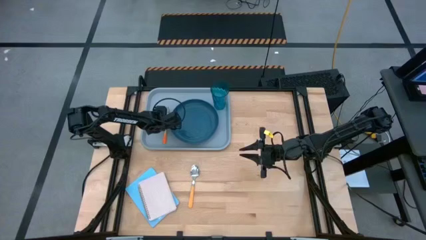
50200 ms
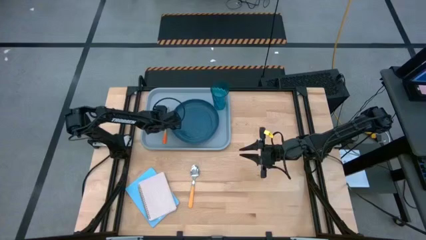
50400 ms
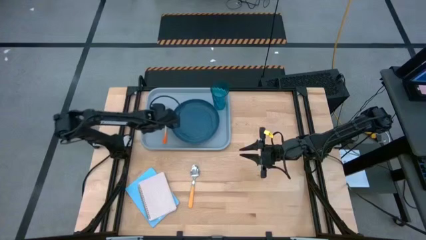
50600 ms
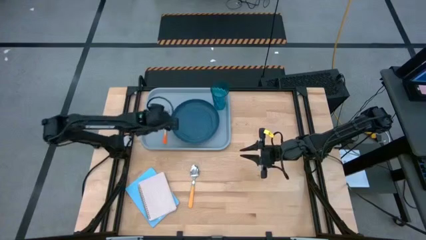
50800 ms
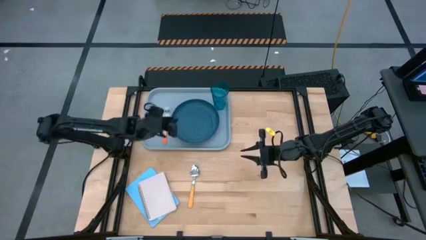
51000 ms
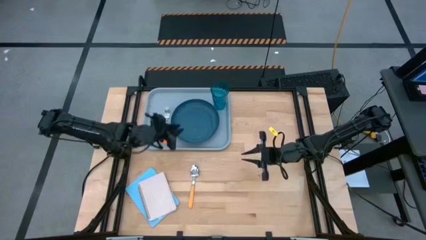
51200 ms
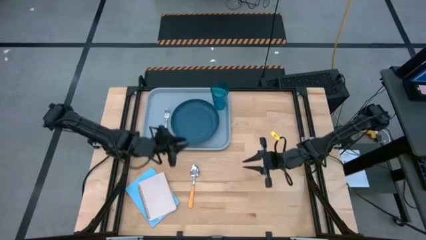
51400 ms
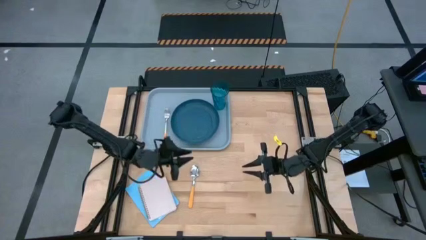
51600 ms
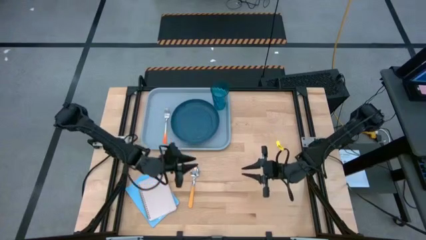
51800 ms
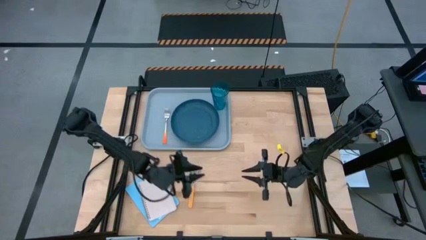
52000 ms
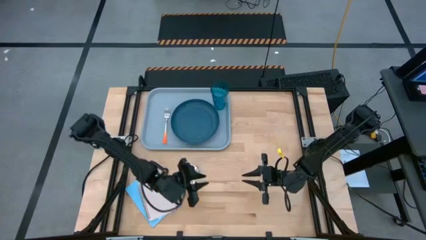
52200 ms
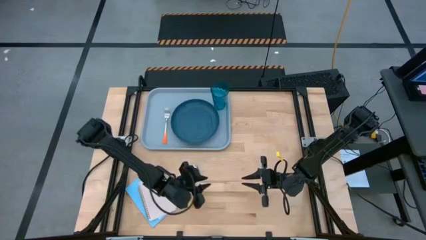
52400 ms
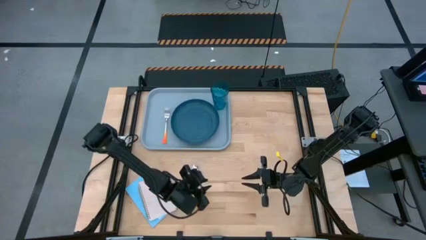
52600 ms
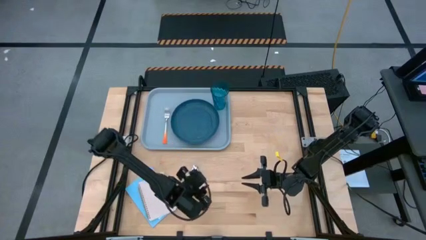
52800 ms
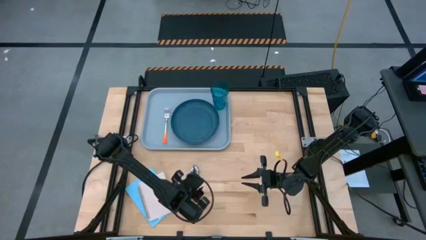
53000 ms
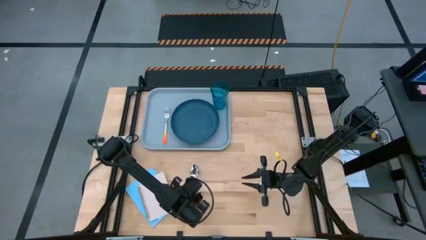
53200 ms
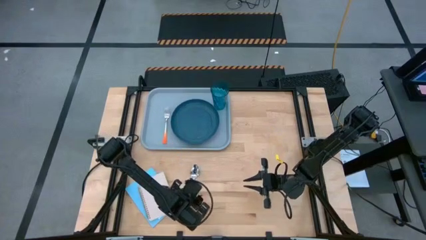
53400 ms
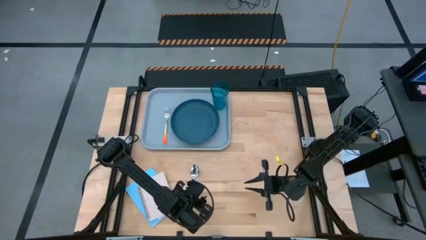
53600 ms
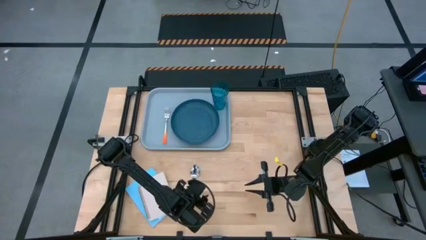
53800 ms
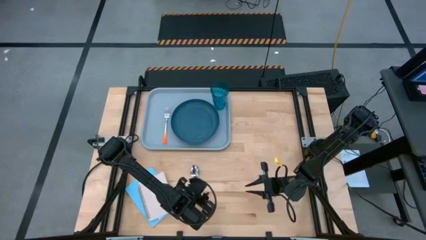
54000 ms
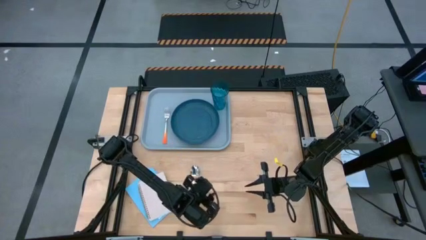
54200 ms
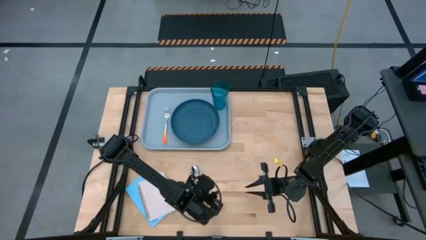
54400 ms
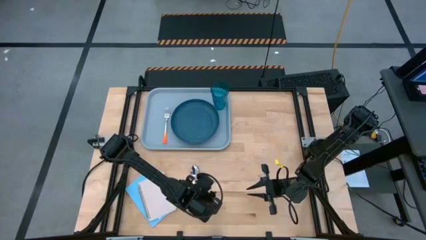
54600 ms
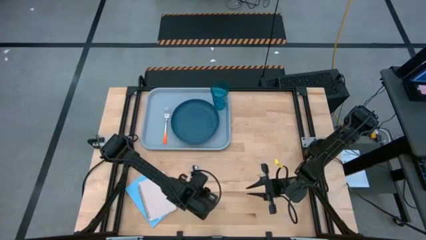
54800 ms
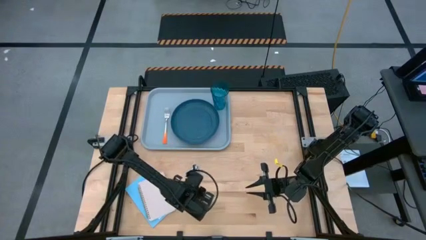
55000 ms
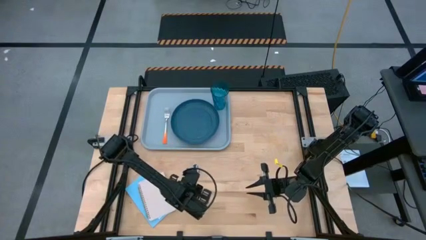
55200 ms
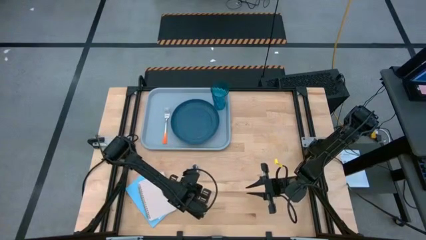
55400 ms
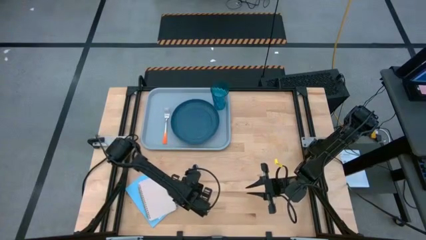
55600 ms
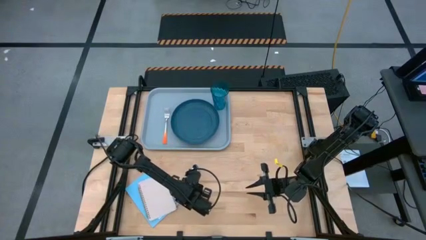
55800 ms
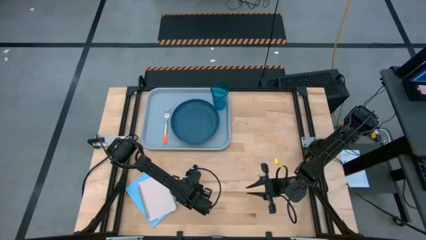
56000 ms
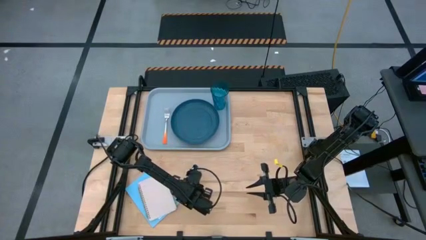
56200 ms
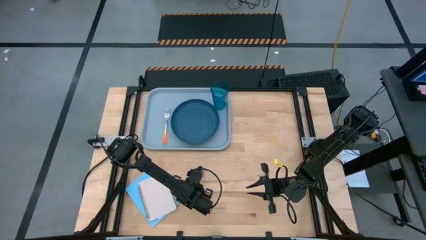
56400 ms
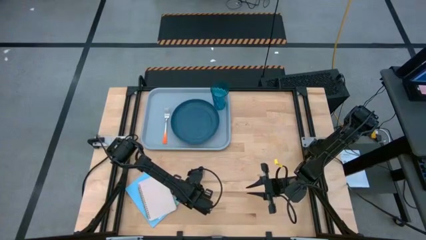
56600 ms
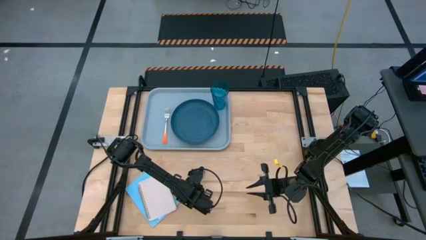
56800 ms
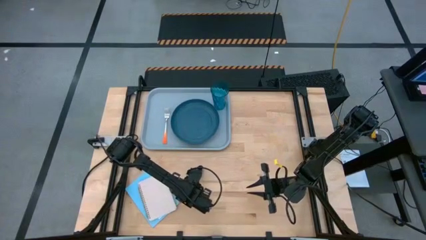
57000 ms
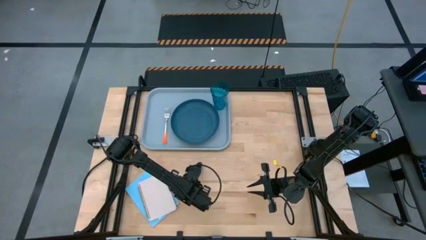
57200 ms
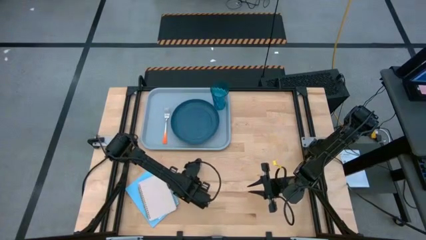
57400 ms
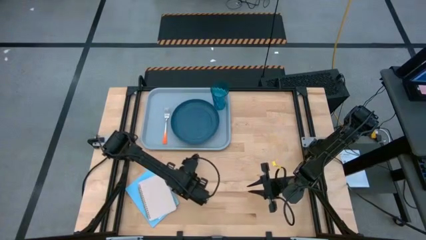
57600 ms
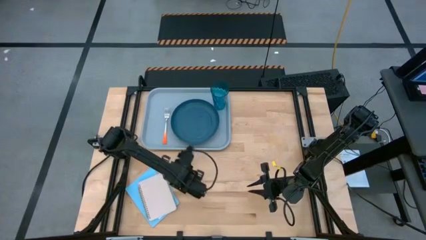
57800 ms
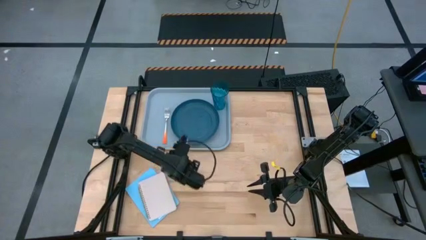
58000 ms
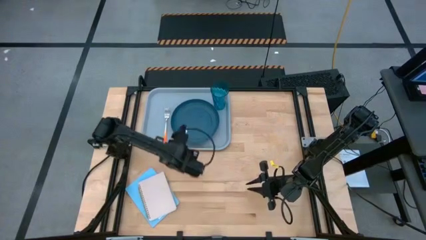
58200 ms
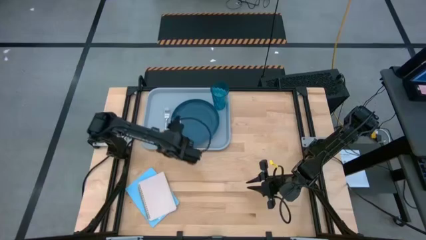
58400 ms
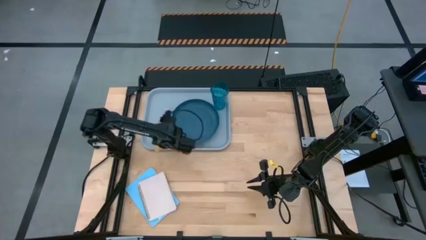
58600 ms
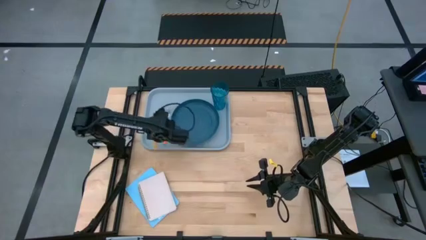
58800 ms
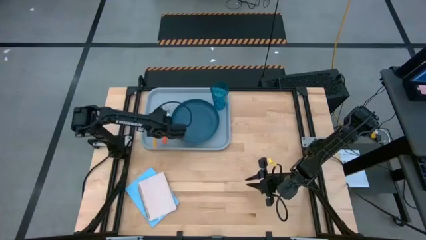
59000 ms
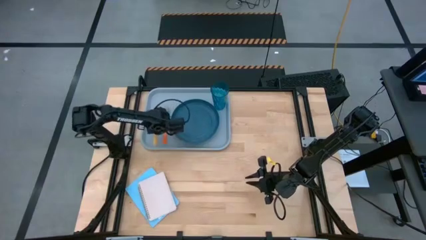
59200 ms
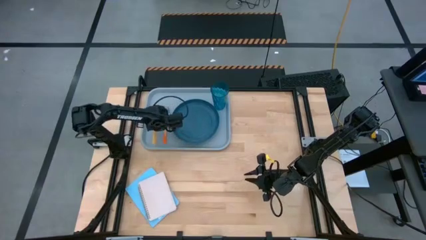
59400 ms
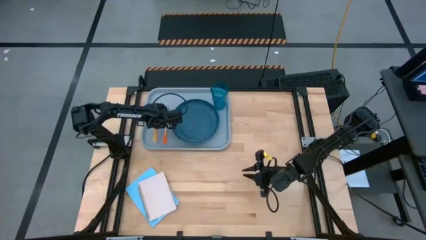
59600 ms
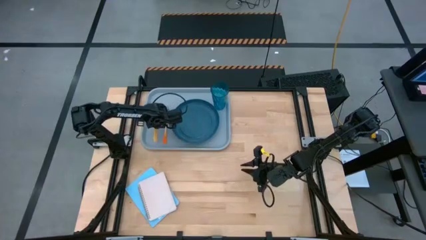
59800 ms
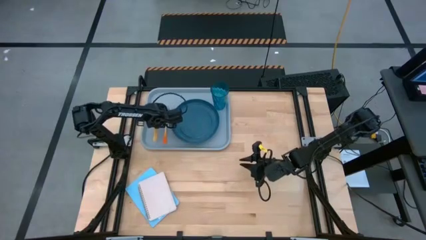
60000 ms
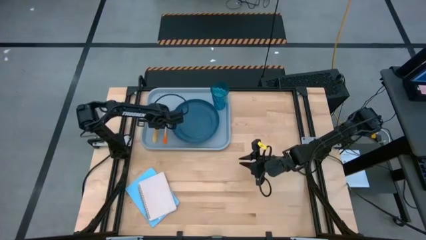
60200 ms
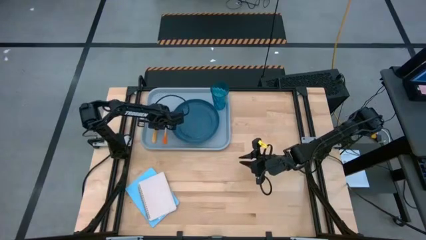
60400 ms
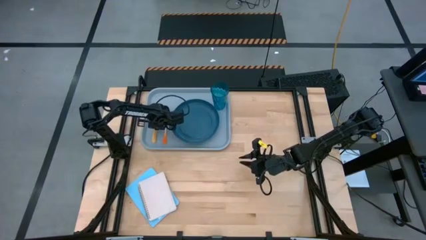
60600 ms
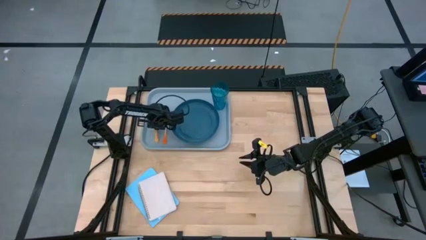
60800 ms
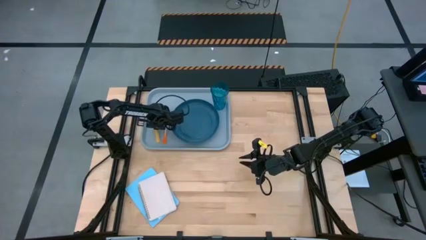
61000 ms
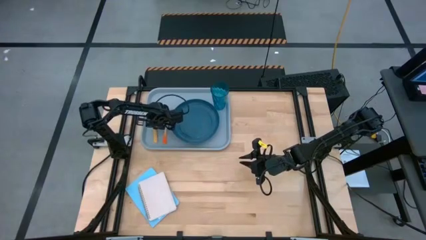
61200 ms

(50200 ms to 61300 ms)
Task: Pick and place plate/cup/fork/spoon on tray
Put the yellow spoon on the light blue tray to the left of the orange fork

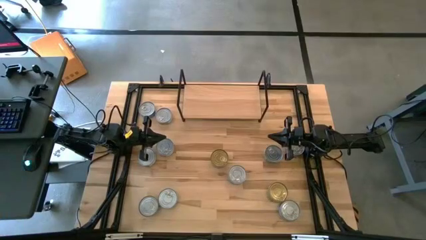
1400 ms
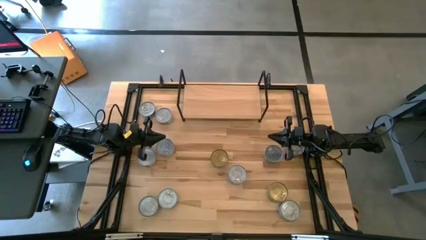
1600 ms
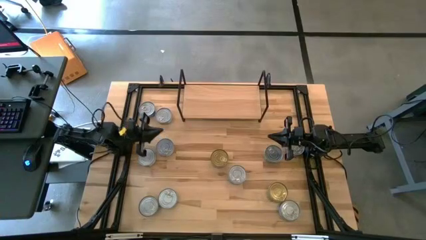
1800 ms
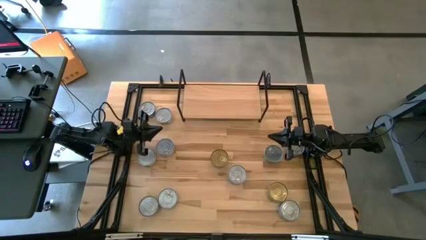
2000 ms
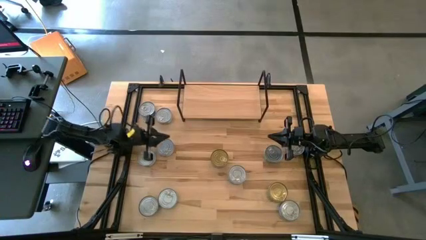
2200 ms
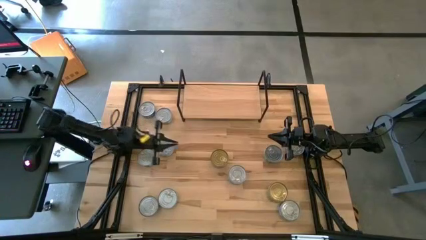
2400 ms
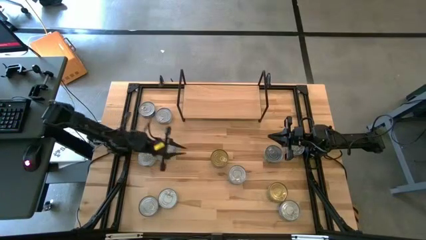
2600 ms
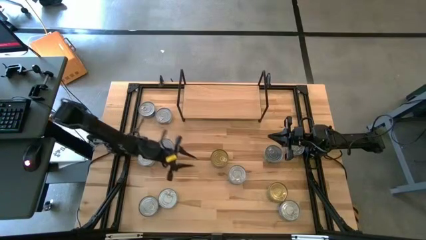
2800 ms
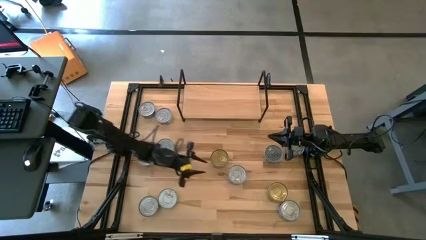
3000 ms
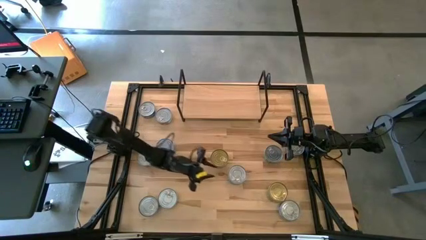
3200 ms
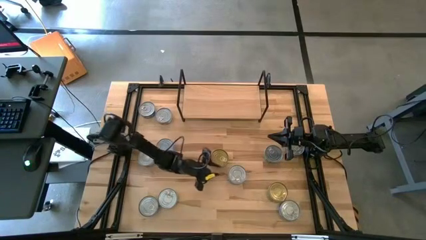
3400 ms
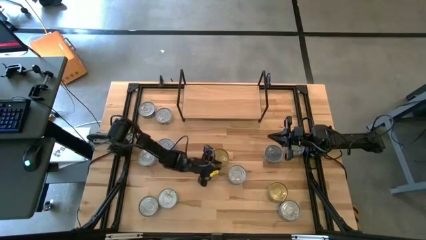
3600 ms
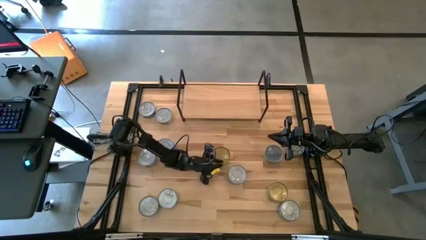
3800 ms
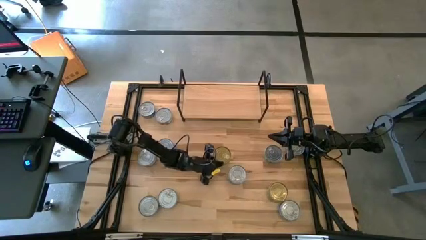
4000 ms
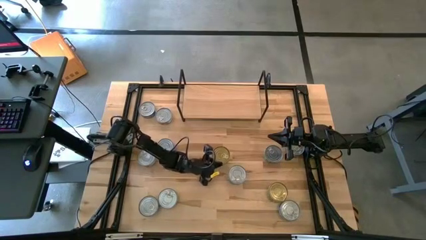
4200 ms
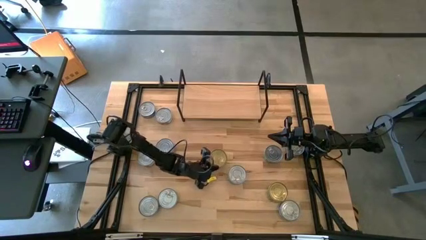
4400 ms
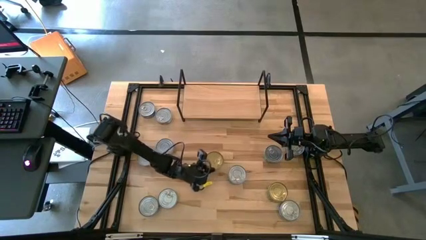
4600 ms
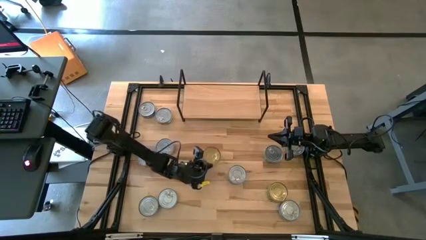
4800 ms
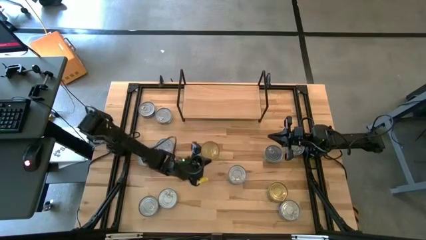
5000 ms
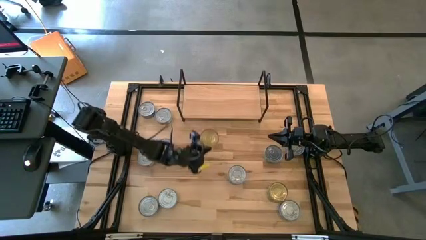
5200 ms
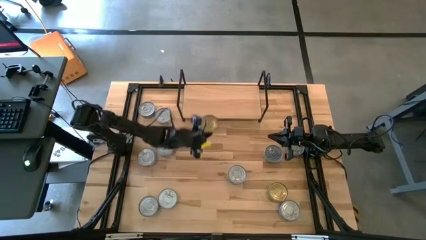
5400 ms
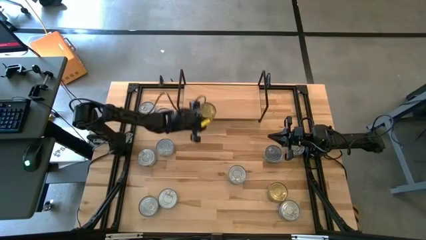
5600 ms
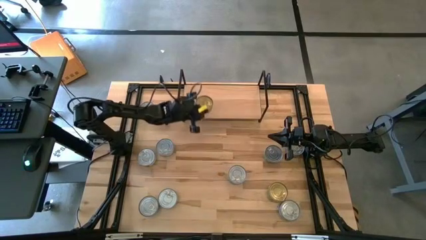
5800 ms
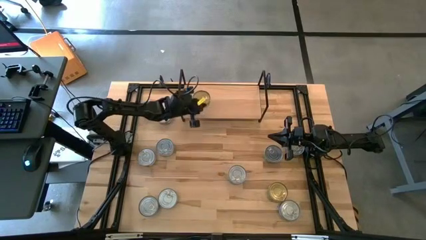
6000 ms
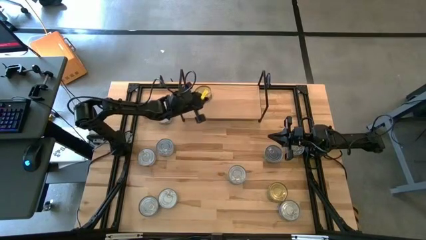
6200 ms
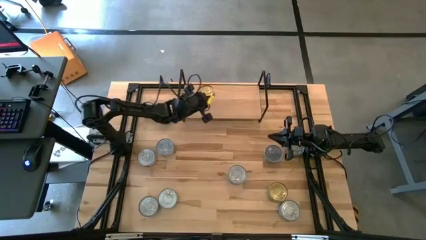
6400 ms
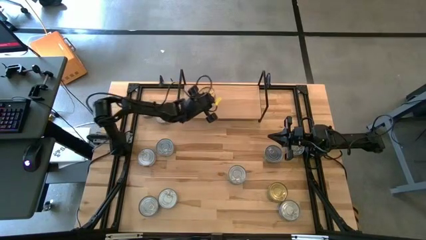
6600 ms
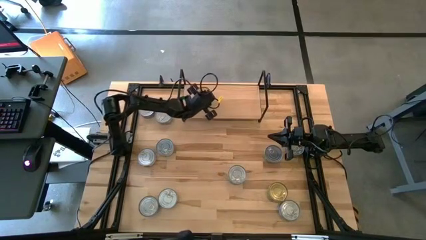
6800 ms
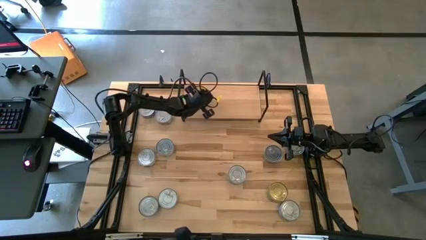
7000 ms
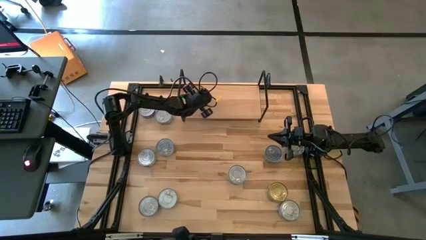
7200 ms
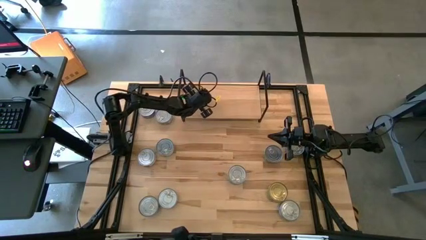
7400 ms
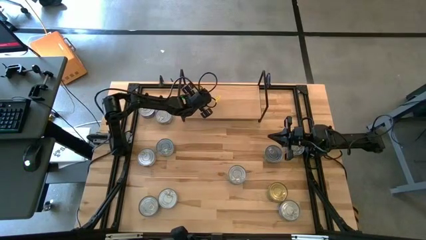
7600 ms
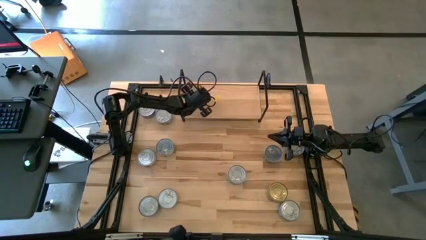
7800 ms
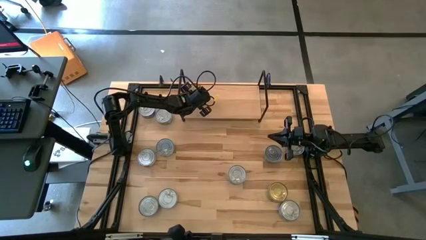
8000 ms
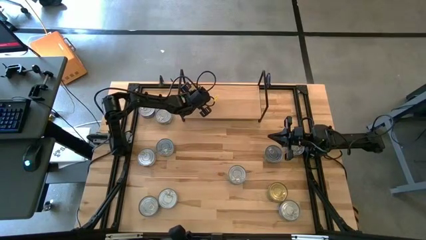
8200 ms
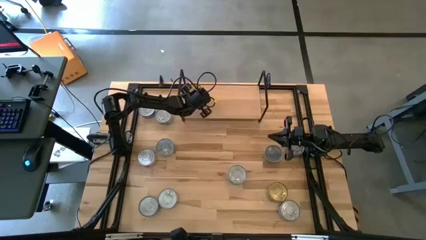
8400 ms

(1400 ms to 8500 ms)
Task: Stack canned seafood by type on shelf
Put the green tuna can on the shelf
